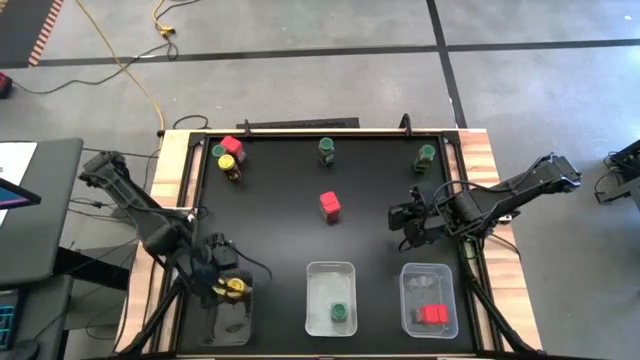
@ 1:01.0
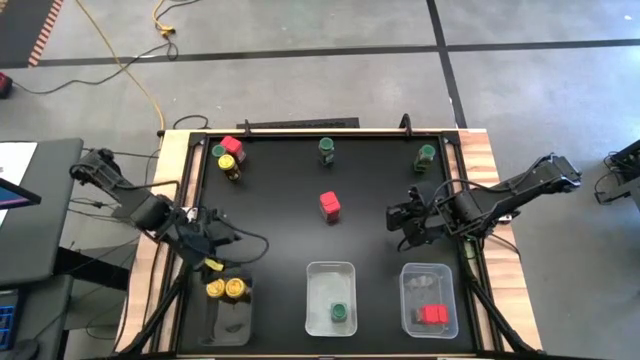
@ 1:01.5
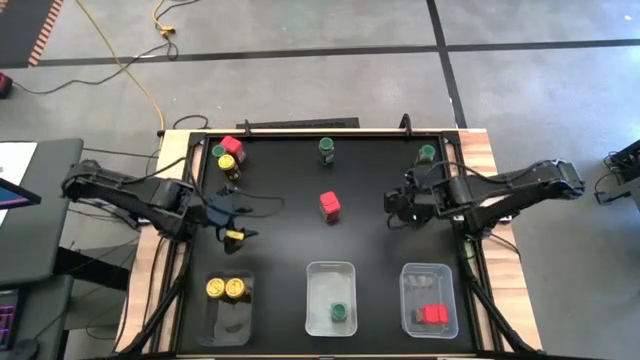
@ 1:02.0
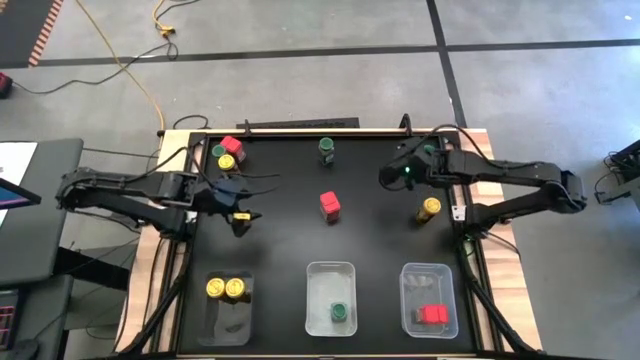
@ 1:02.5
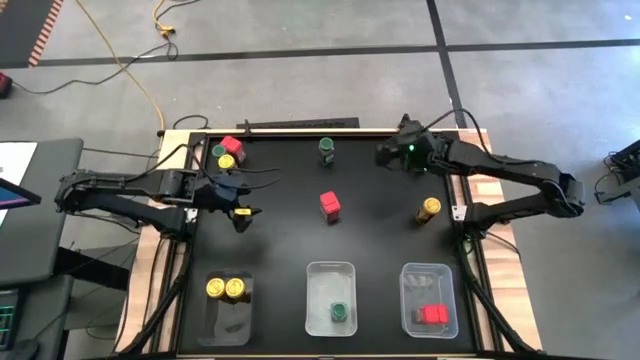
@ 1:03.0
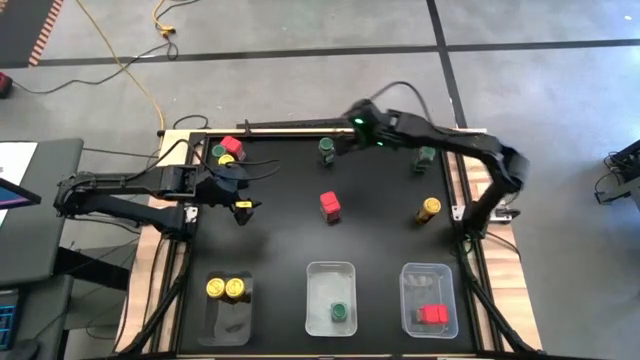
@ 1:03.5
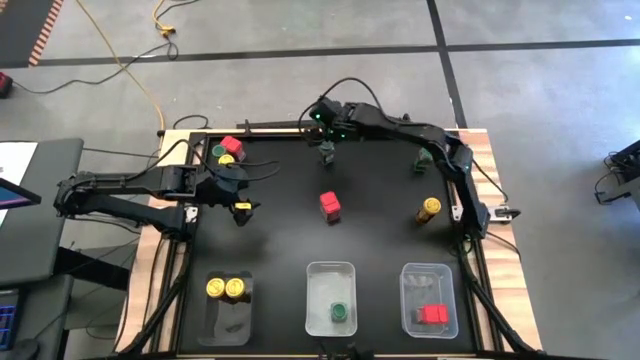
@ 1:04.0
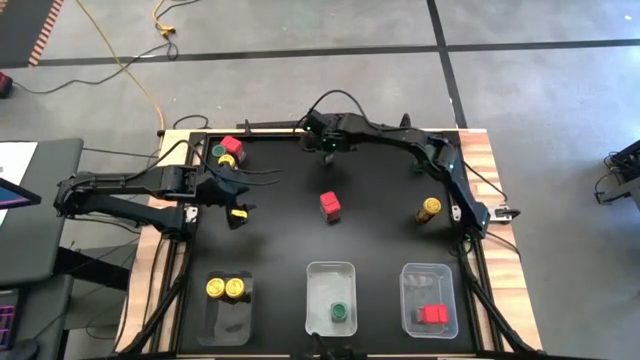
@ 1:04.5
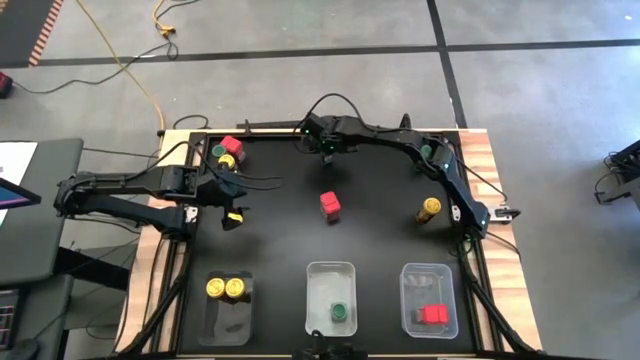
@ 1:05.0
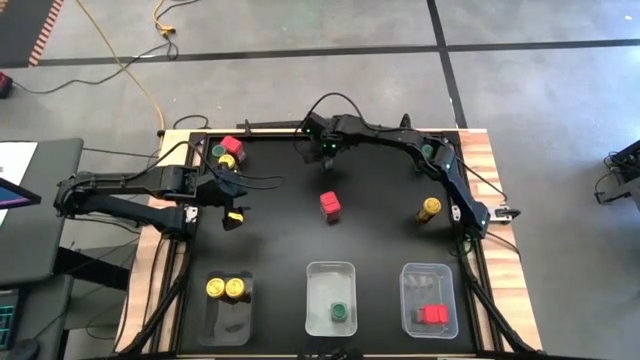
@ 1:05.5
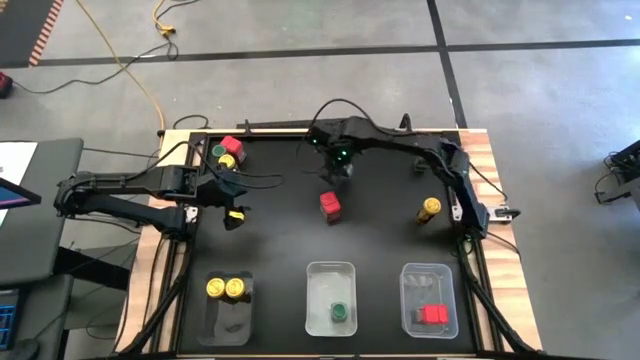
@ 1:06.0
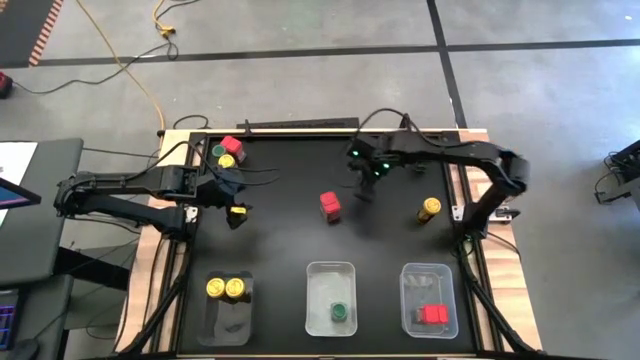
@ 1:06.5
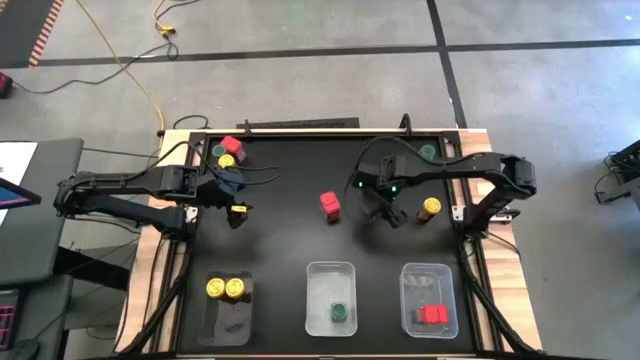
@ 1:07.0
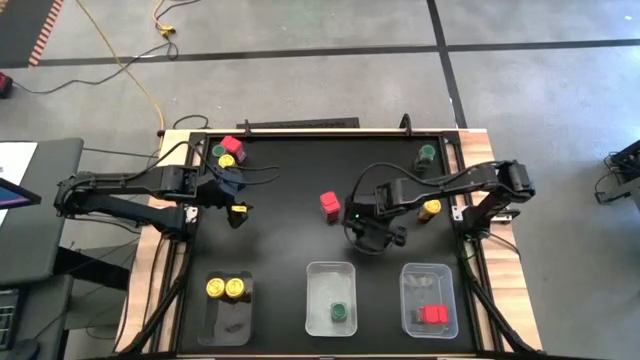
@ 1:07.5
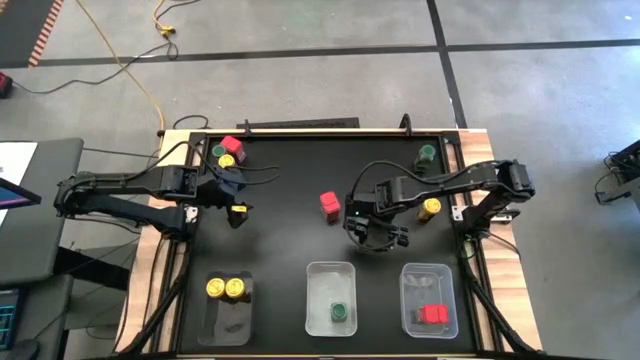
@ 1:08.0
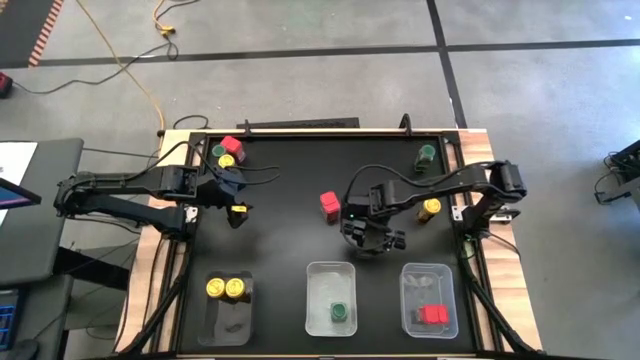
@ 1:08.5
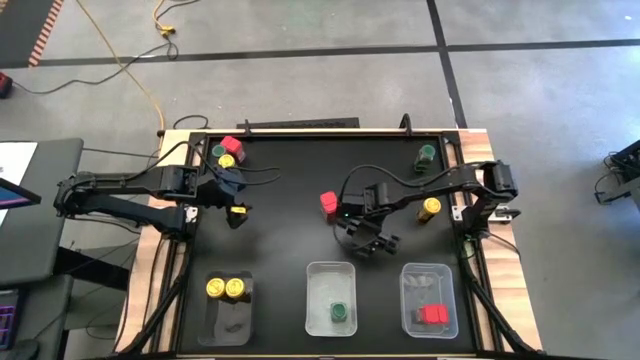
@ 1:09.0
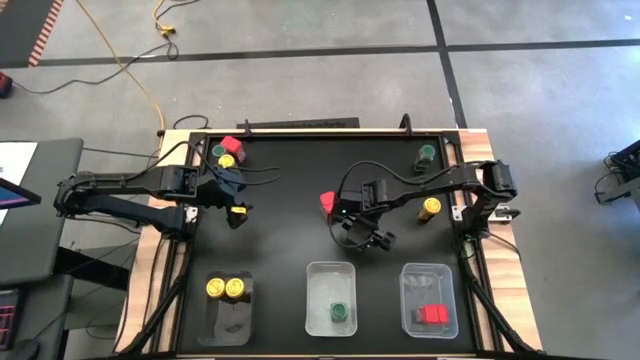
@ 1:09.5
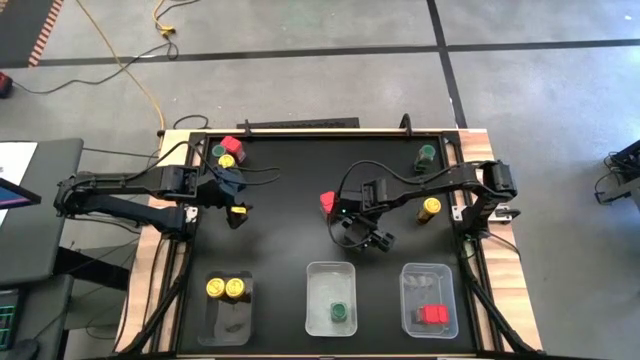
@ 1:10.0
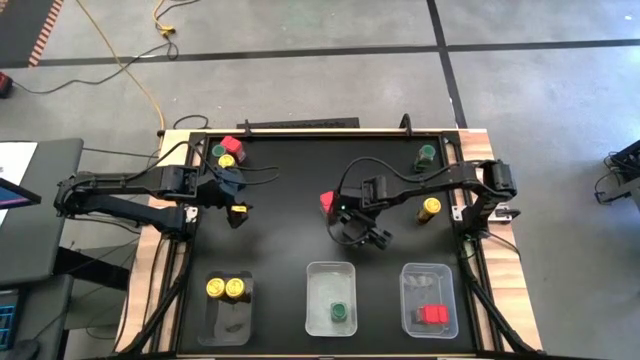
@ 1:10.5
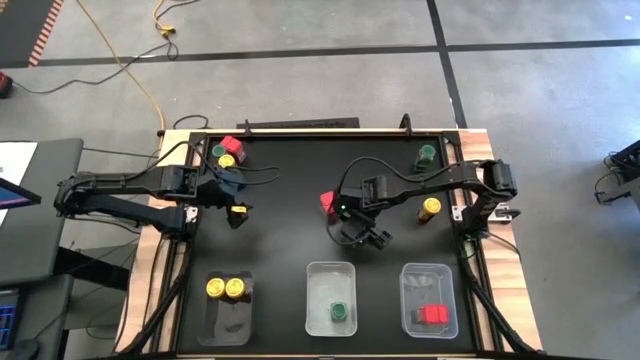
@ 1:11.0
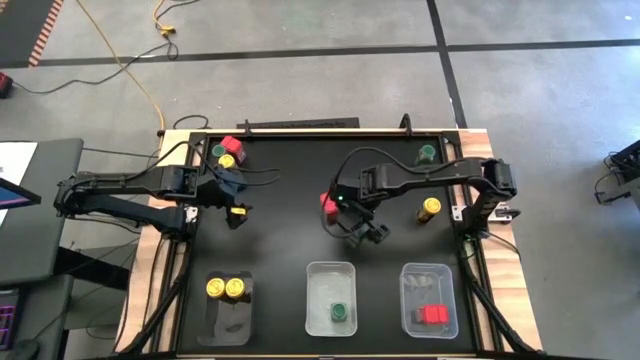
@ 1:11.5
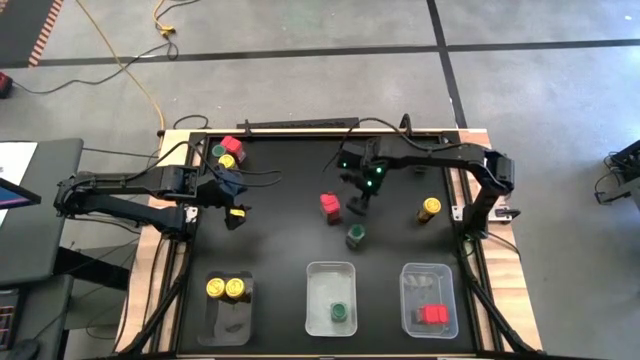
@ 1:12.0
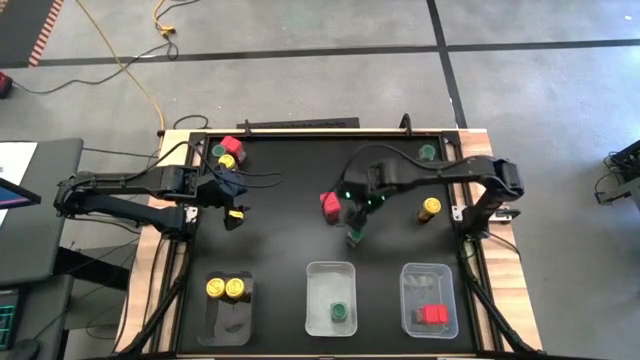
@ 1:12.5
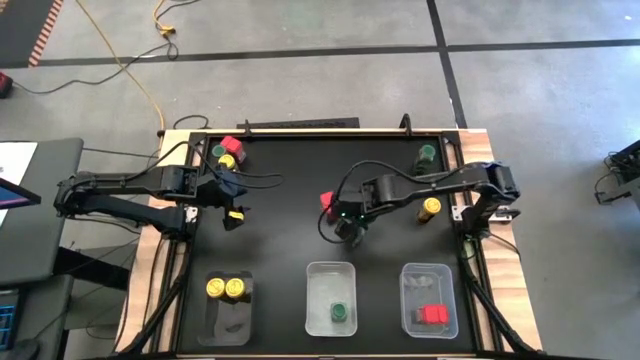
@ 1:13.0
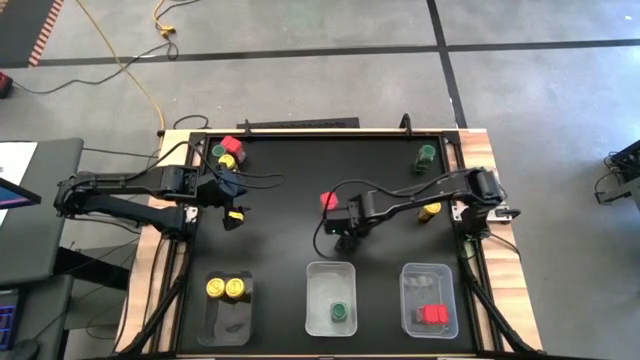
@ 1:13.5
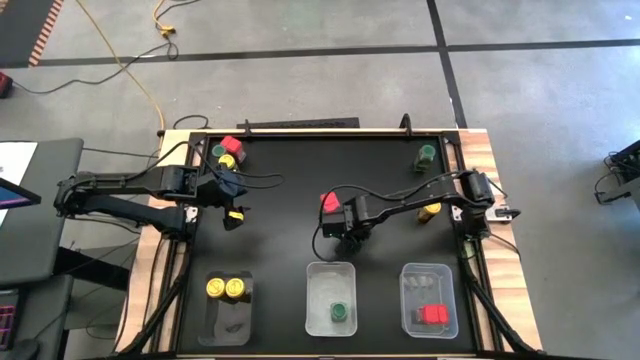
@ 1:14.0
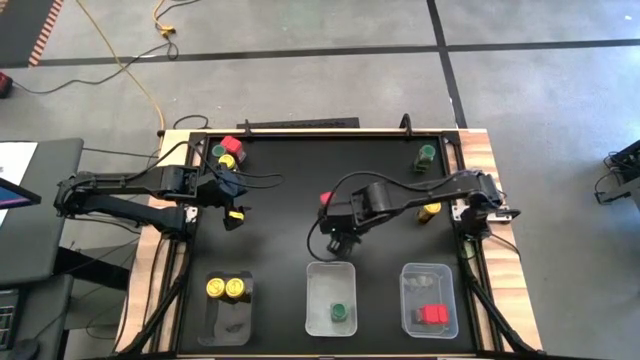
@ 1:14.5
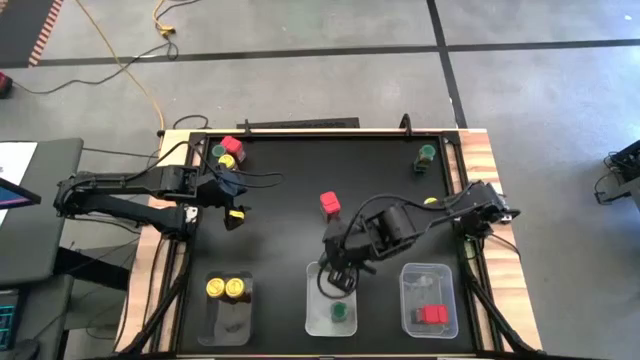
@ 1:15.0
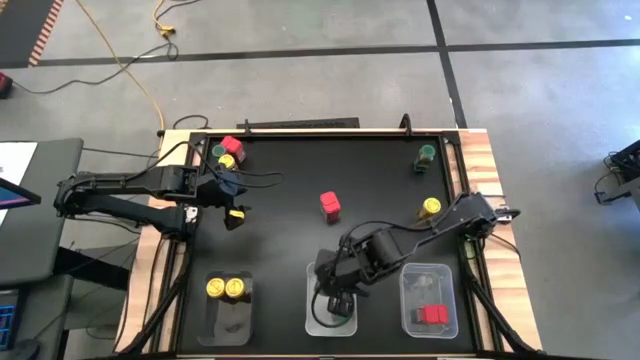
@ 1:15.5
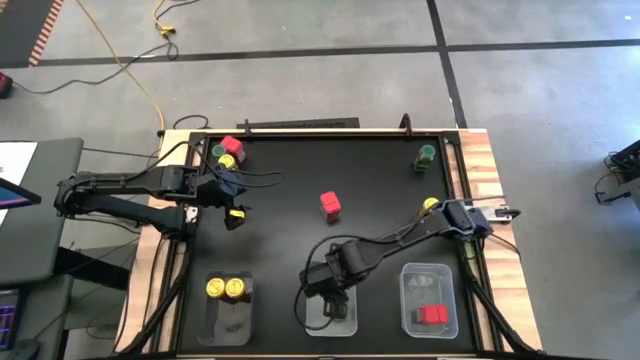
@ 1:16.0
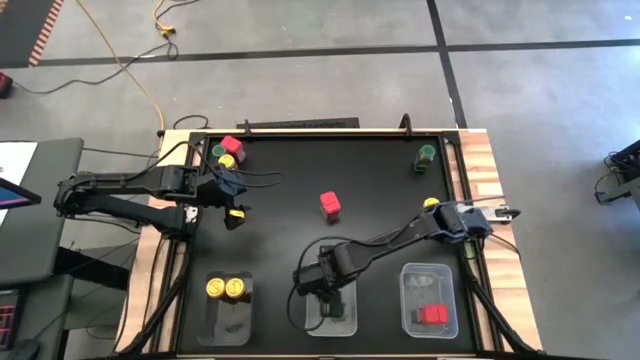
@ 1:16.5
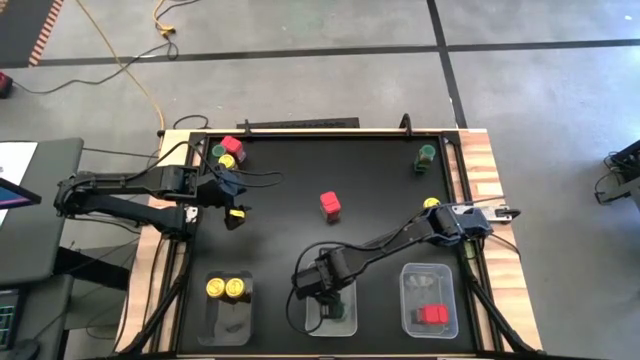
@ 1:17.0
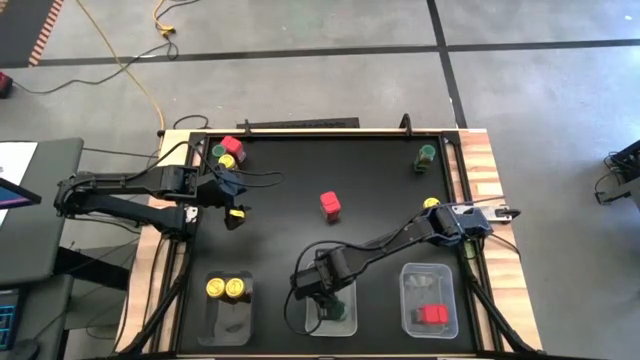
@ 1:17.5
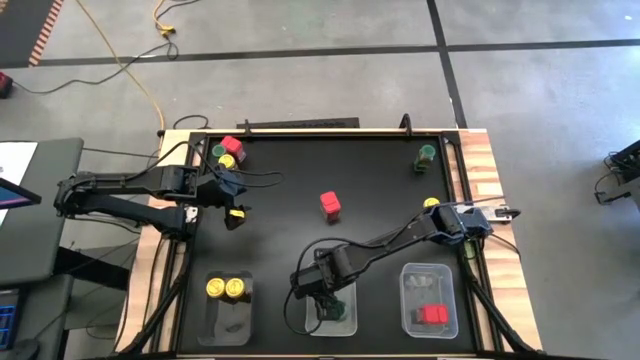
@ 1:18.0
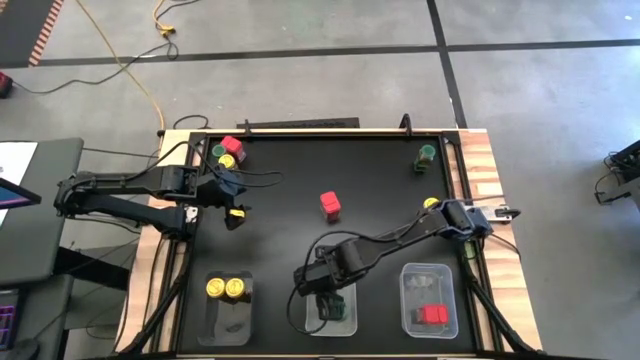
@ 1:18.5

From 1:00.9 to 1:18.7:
Task: Sort spices by type
Put the center green seasoning bottle into the white bin

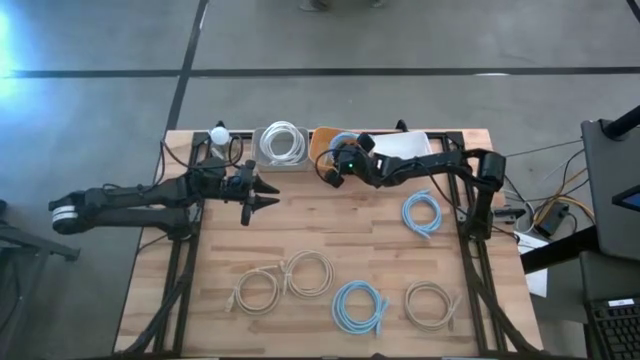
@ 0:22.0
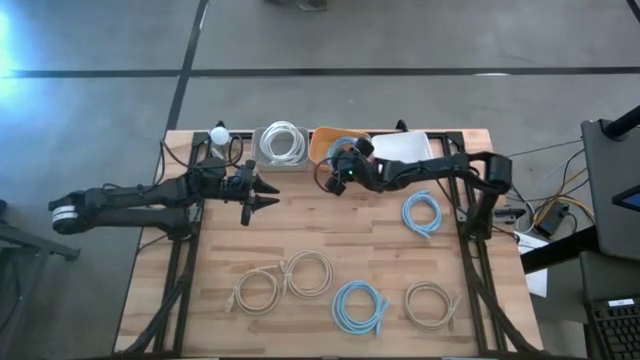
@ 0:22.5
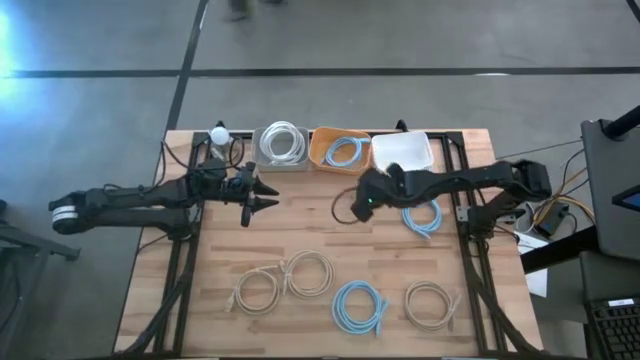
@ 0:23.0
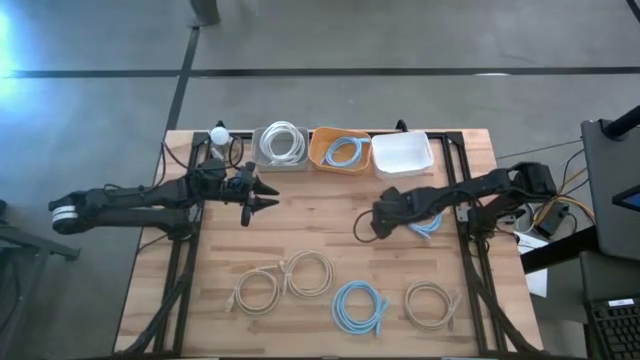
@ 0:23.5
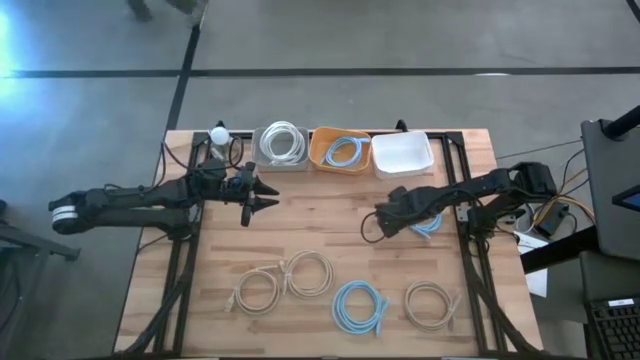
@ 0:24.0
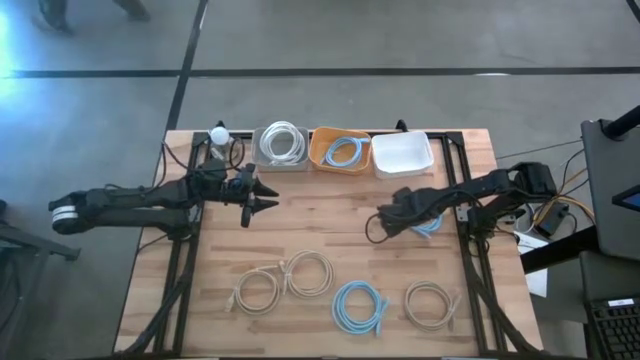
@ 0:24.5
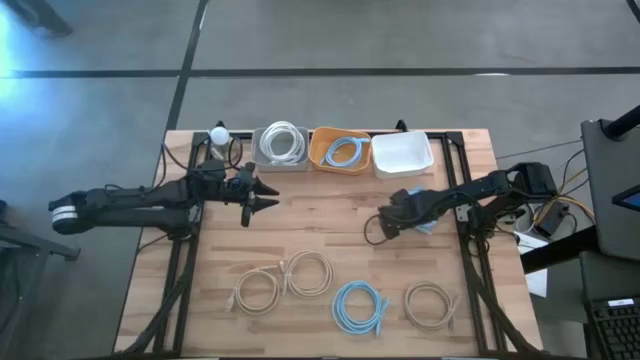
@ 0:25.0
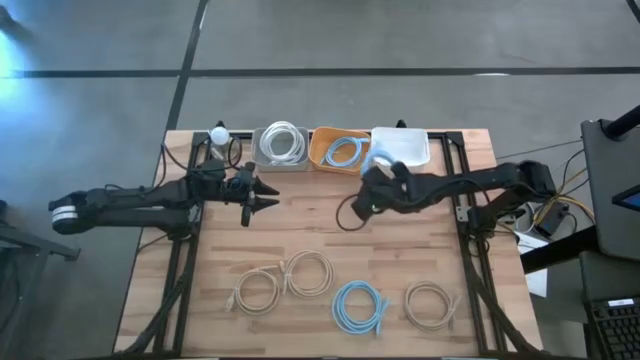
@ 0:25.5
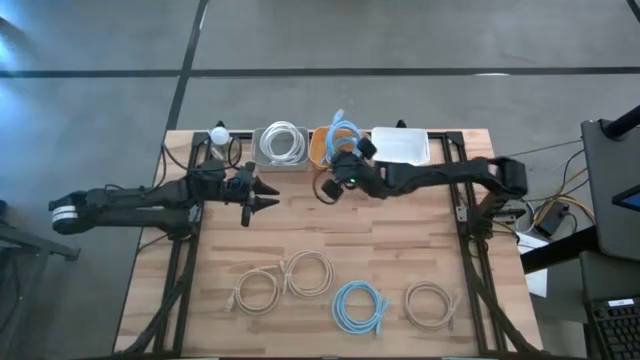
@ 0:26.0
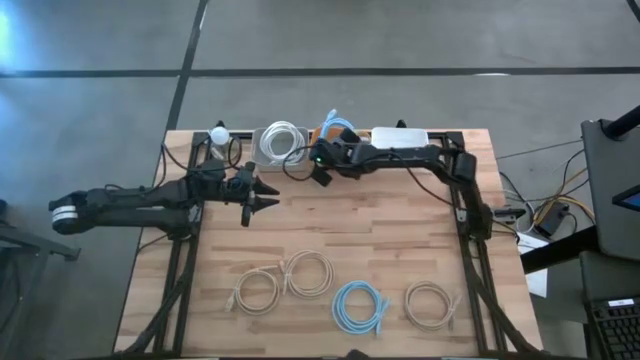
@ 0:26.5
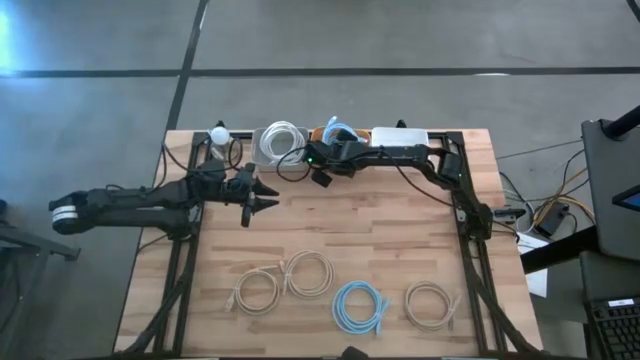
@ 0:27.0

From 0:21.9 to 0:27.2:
Task: Pick & Place USB Port
Put the top blue charger cable into the orange bin
